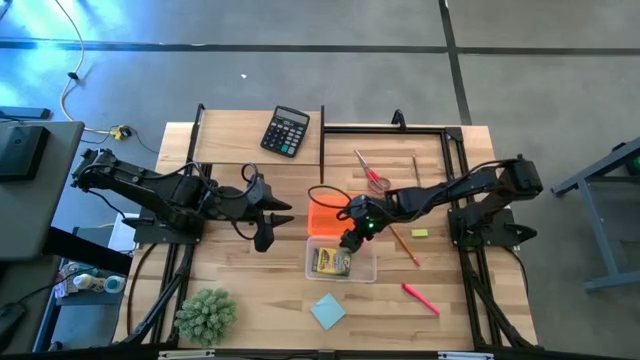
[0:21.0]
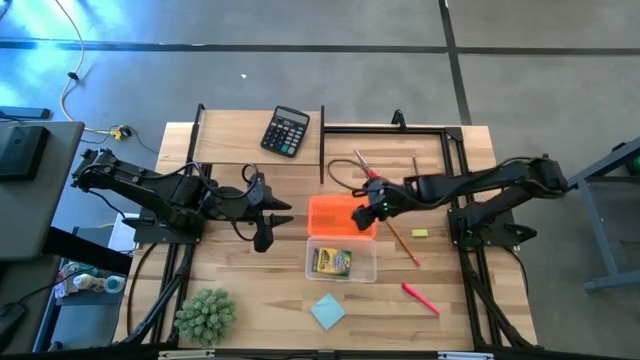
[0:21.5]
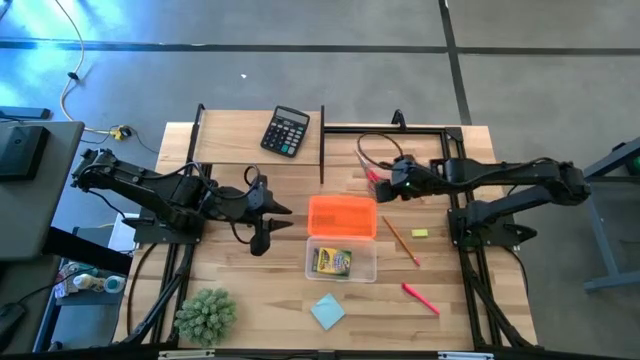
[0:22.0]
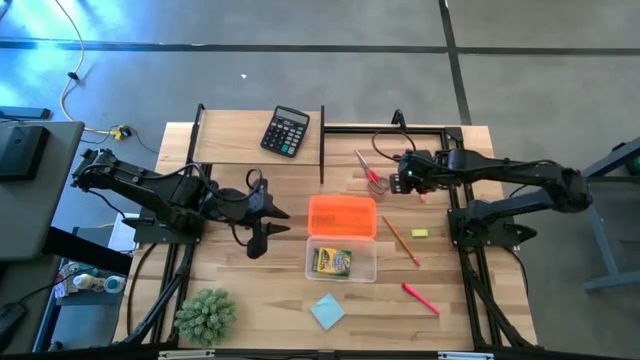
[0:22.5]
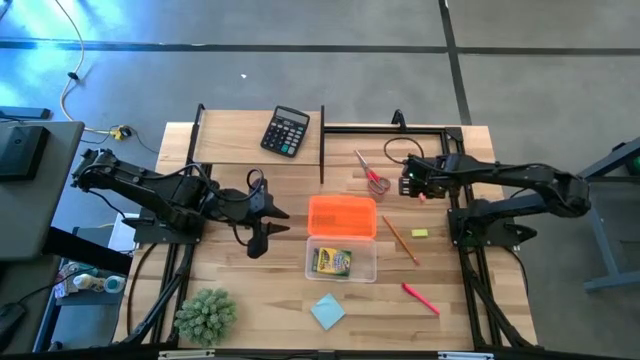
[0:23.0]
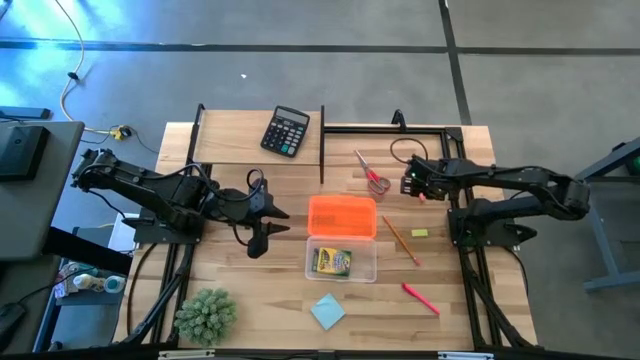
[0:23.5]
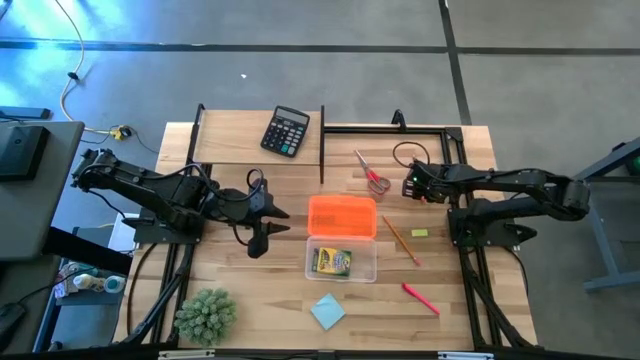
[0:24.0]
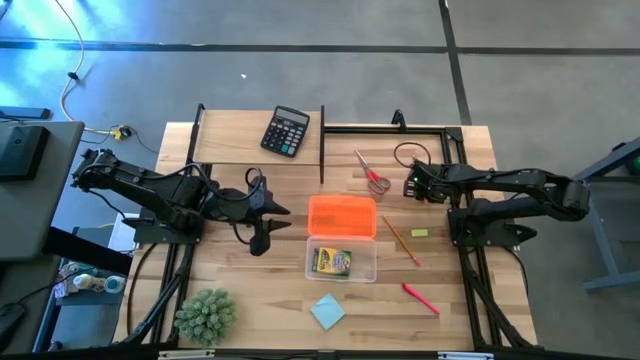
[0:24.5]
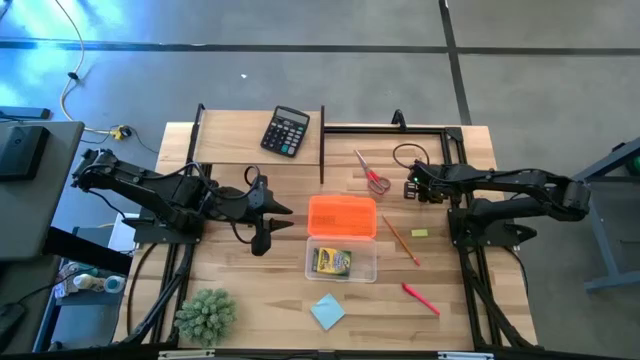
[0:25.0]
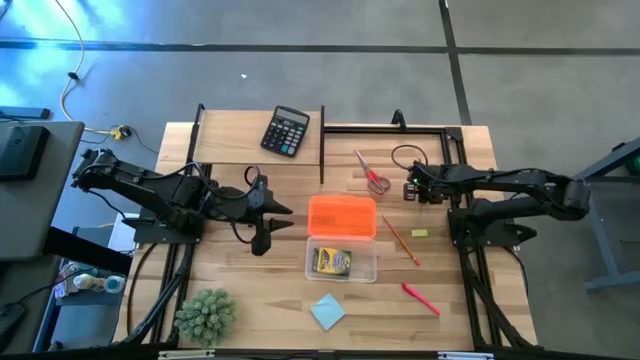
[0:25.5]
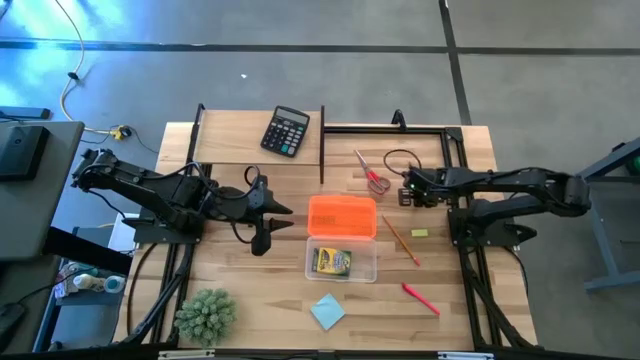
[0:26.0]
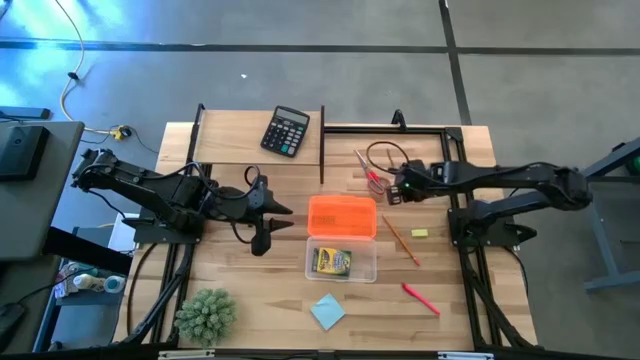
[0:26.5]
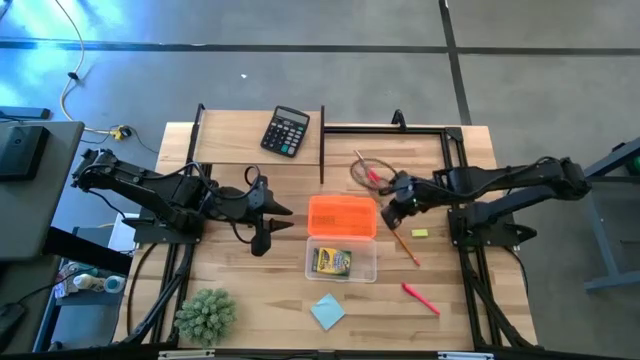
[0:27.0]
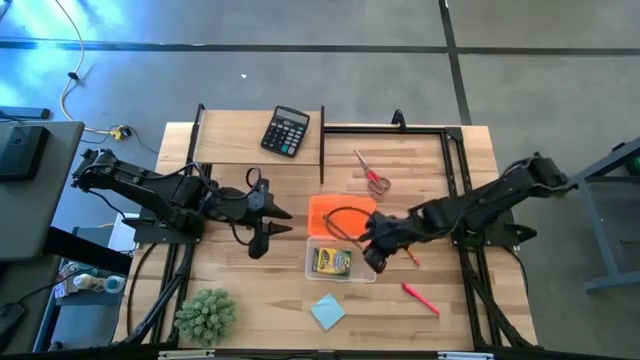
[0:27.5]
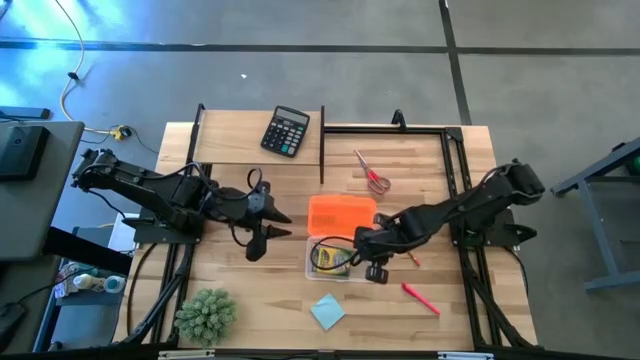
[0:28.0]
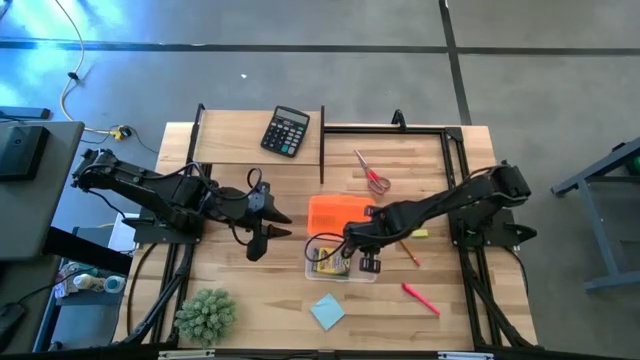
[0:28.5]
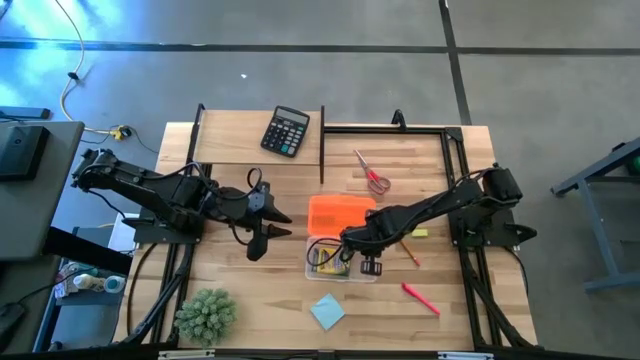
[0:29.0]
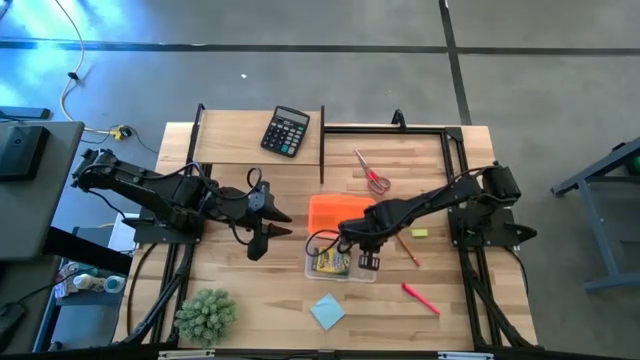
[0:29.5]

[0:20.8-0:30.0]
Task: Pack school essentials
Put the black pencil into the supply box

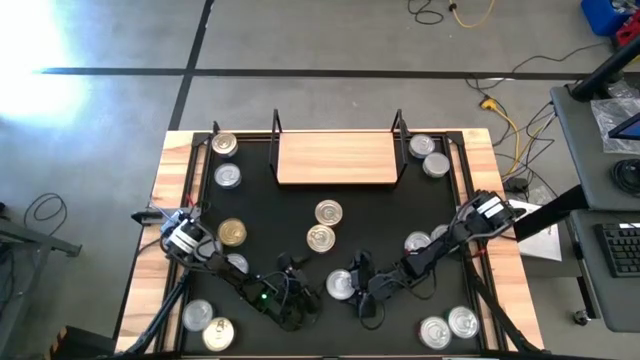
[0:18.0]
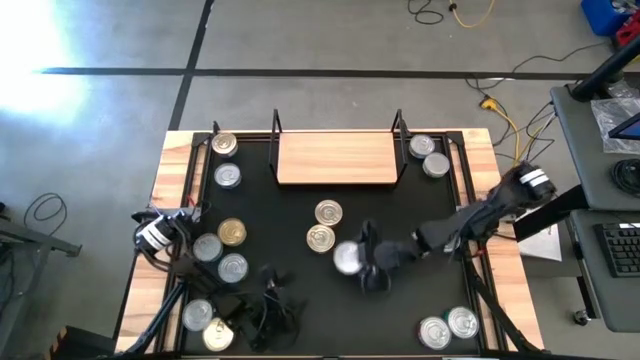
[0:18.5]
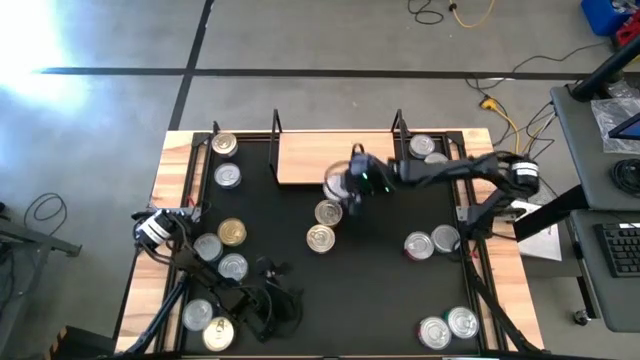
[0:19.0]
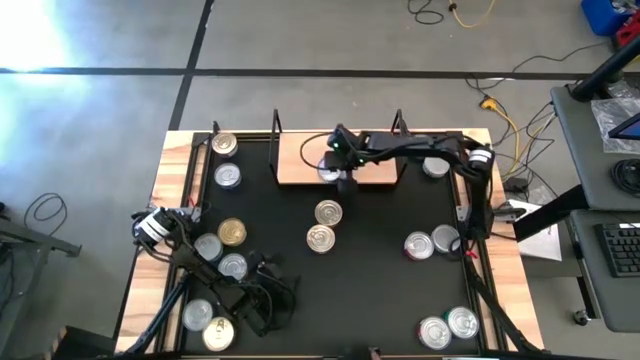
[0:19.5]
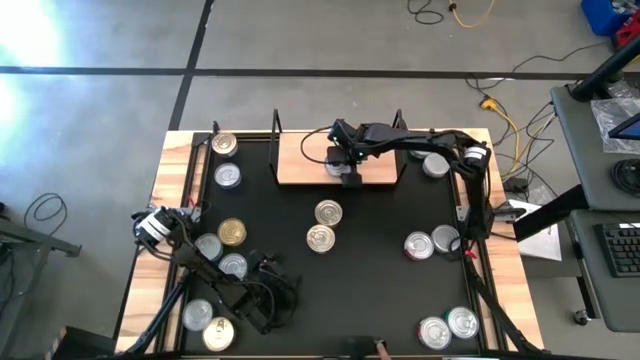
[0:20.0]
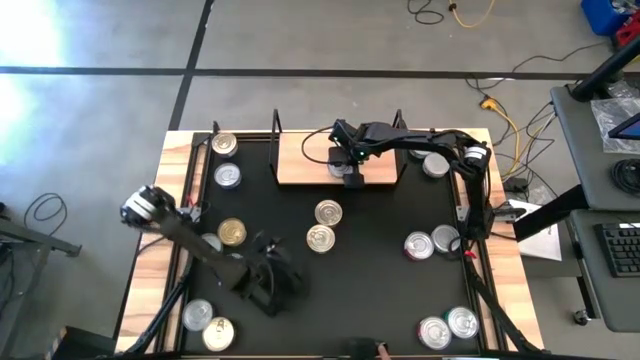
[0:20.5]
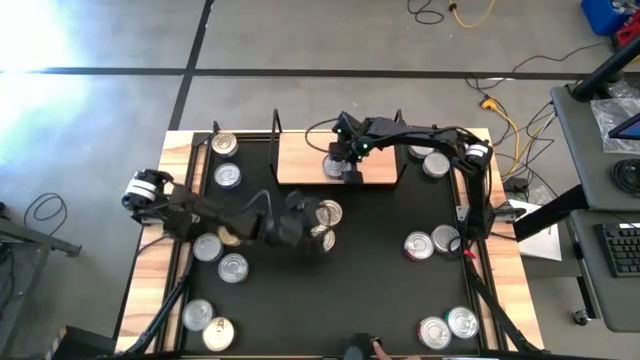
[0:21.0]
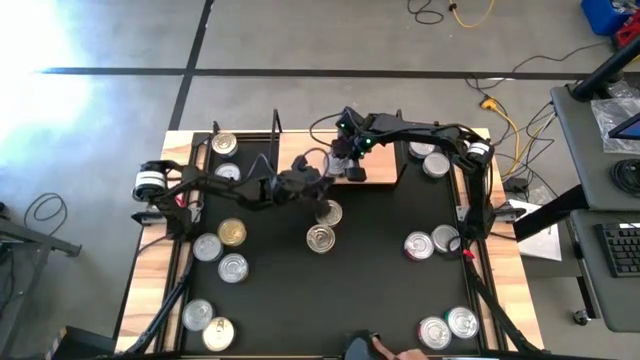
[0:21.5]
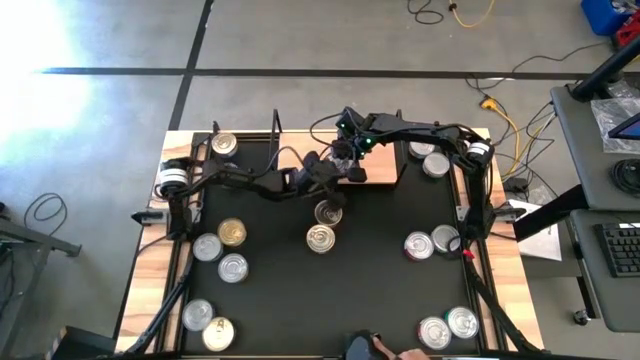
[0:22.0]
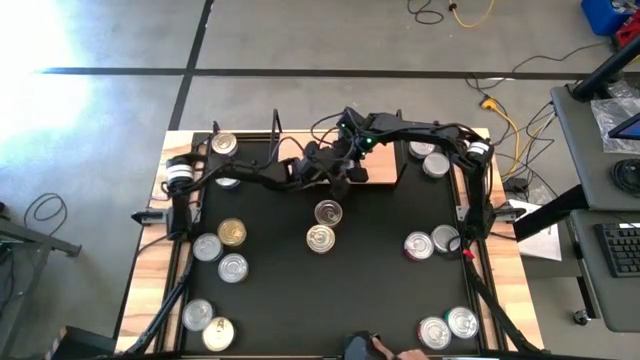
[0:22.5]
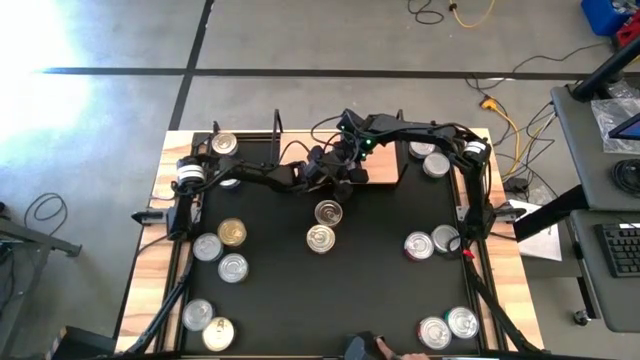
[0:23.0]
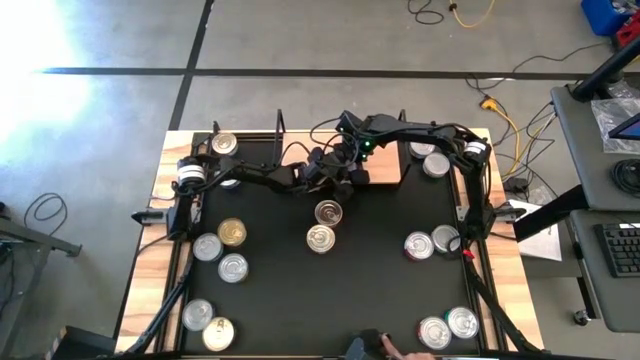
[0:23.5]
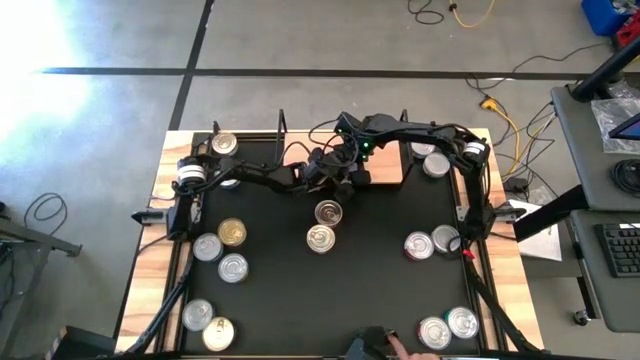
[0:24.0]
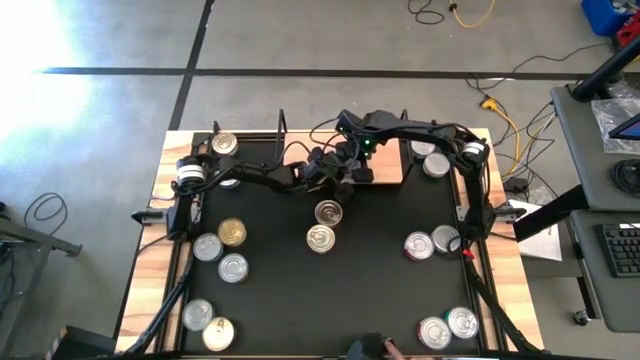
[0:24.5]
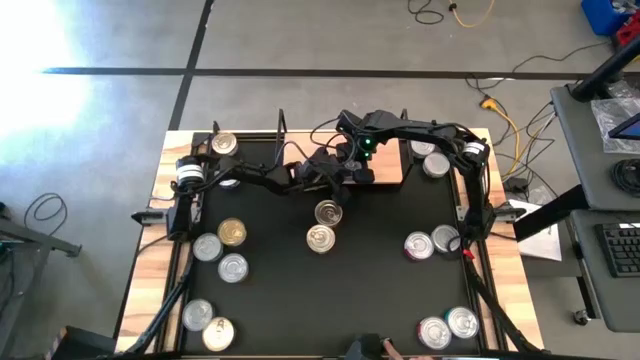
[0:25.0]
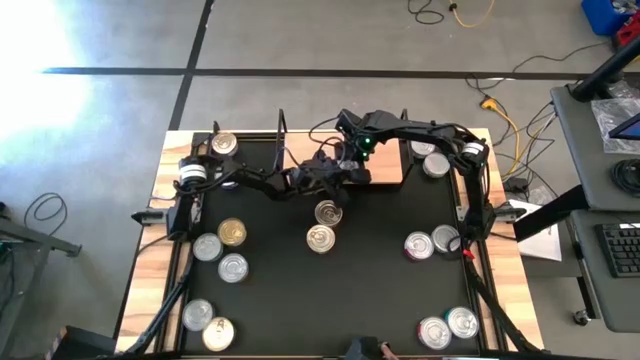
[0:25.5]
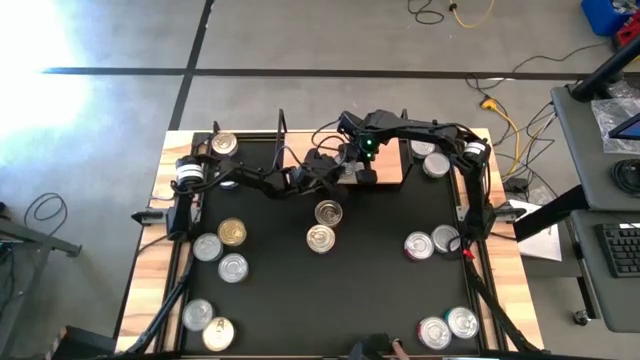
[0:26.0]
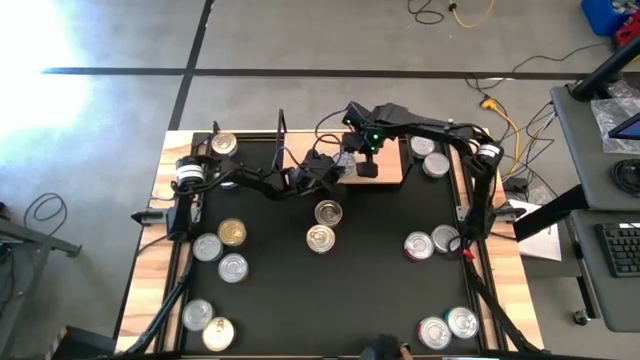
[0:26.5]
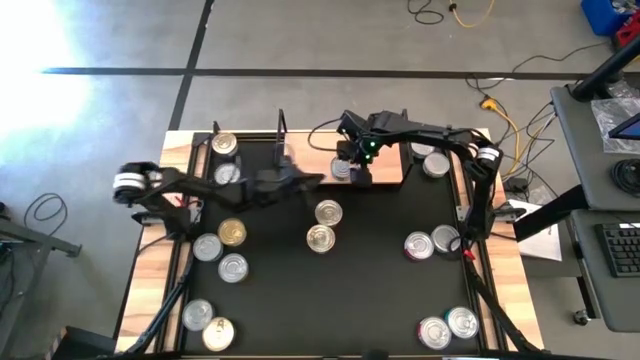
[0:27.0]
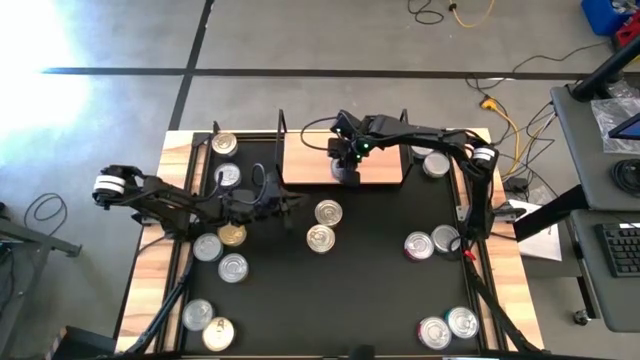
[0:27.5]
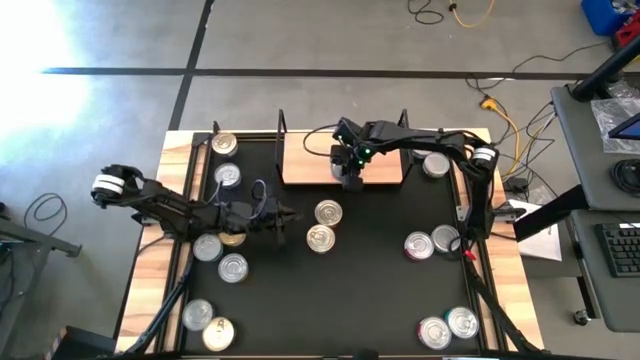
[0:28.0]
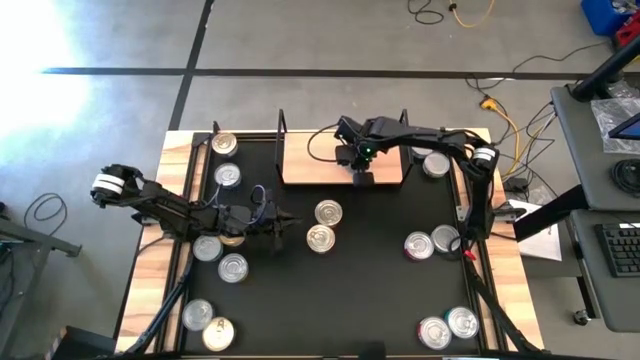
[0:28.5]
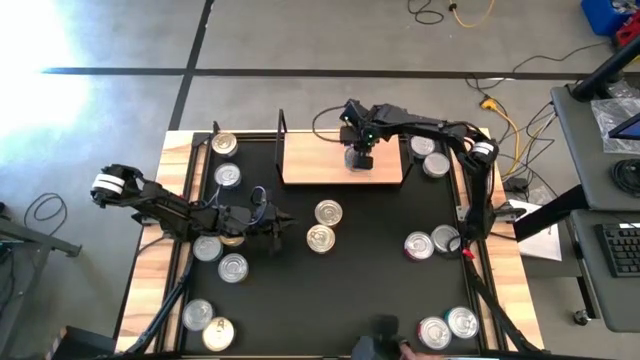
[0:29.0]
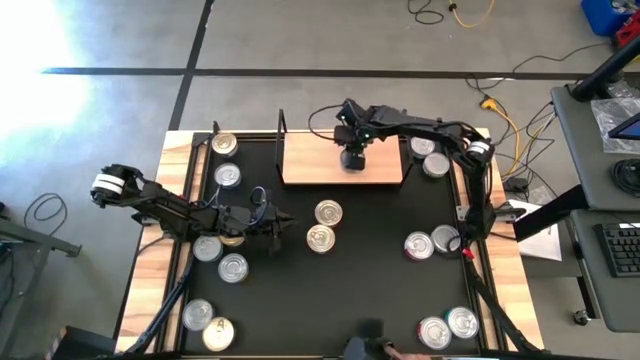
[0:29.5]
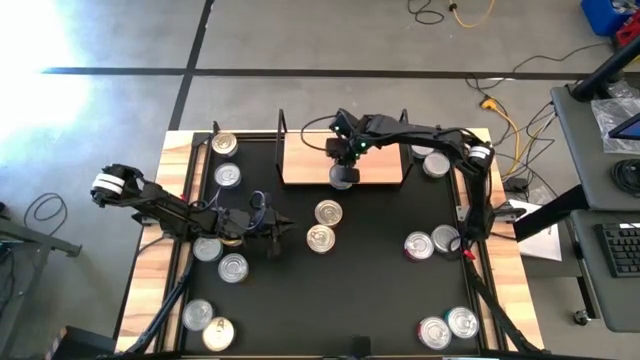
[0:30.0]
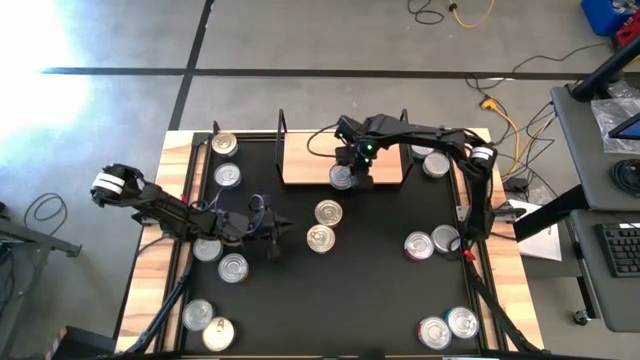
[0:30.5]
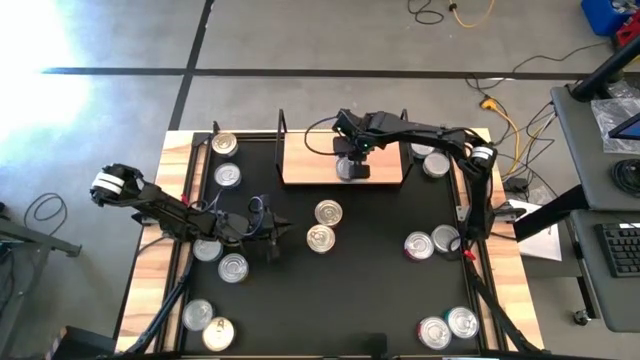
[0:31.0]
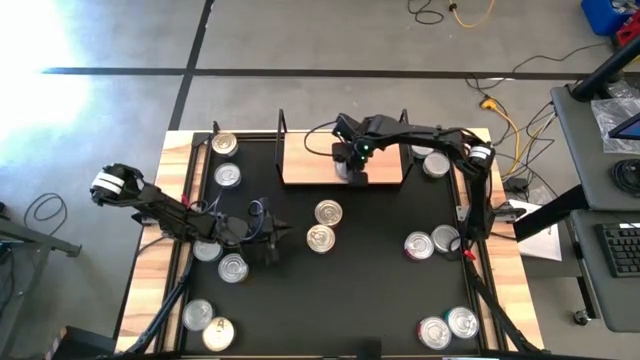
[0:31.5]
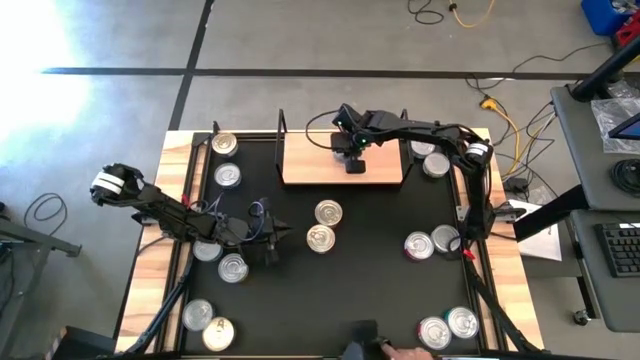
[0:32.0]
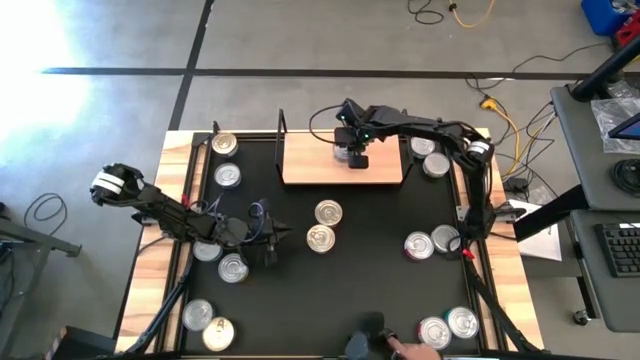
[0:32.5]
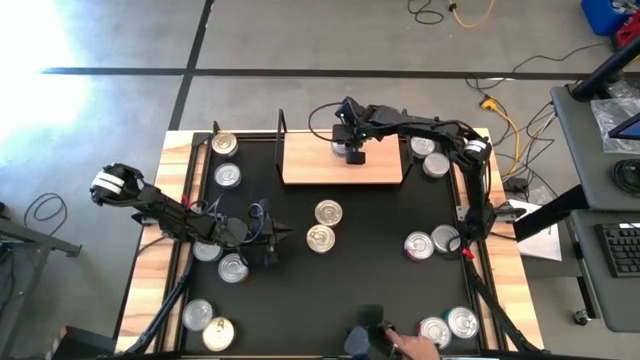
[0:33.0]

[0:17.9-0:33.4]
Task: Stack canned seafood by type on shelf
Put the green tuna can on the shelf
